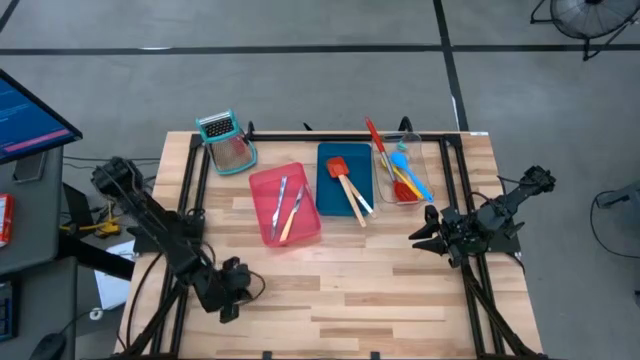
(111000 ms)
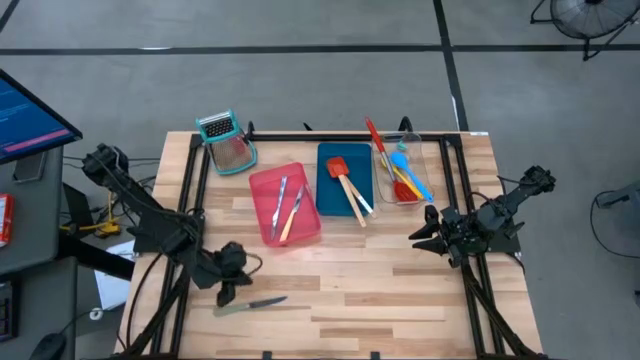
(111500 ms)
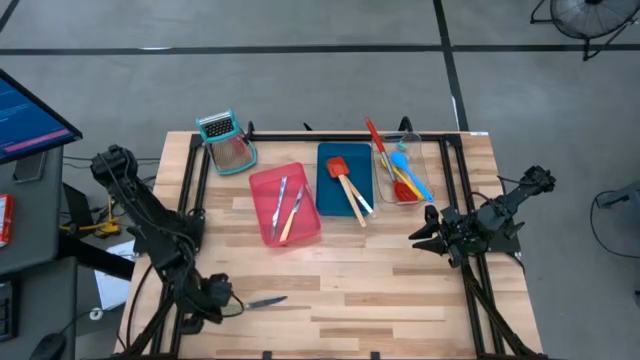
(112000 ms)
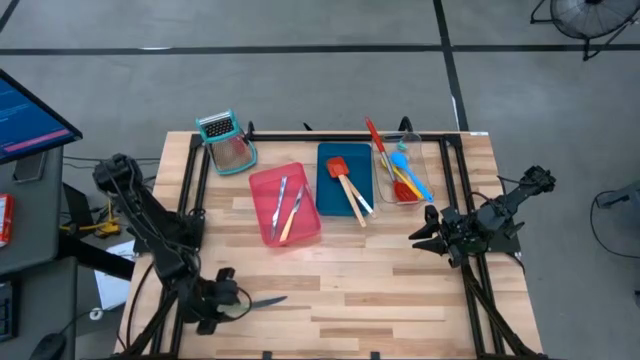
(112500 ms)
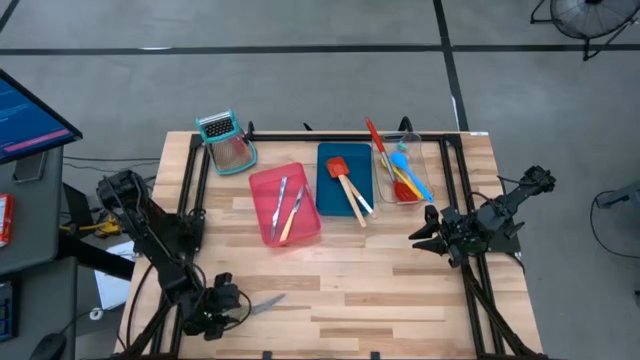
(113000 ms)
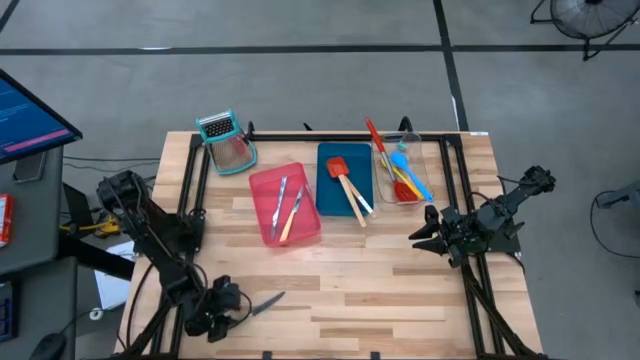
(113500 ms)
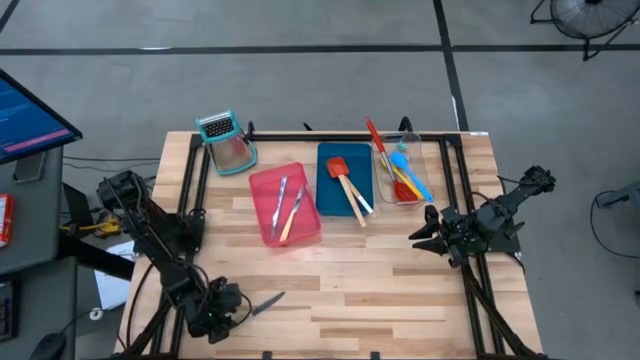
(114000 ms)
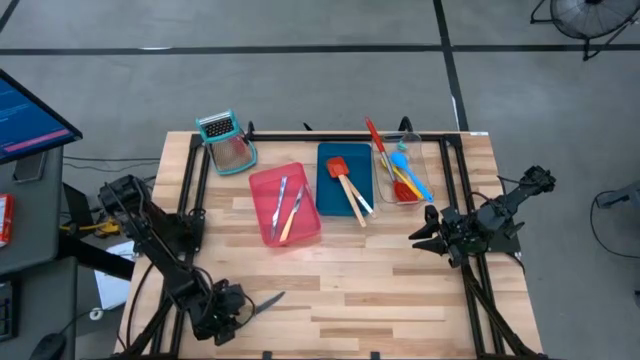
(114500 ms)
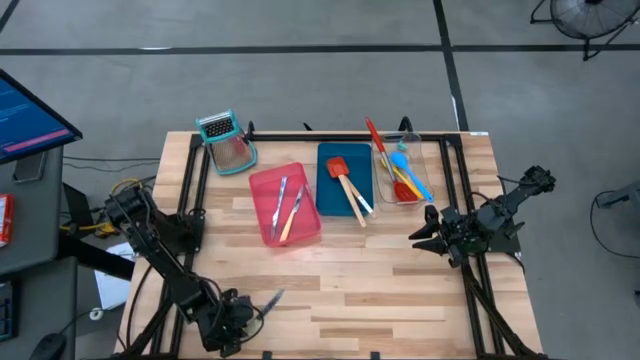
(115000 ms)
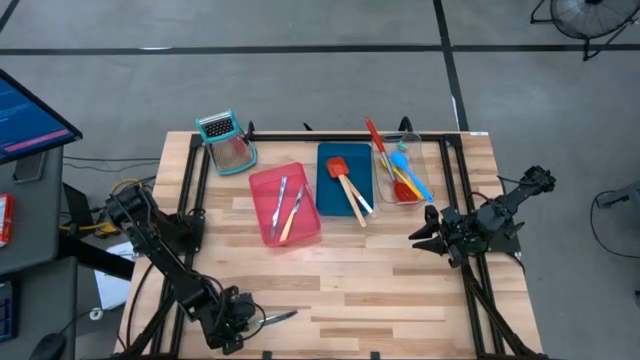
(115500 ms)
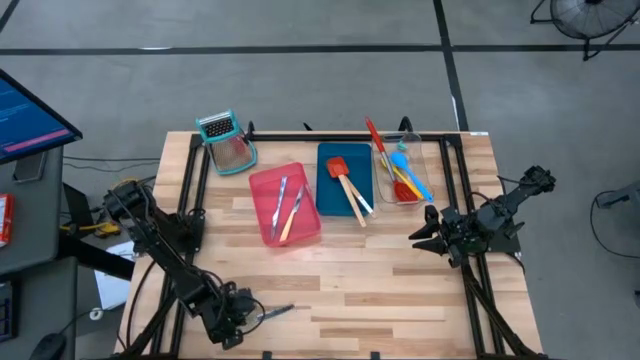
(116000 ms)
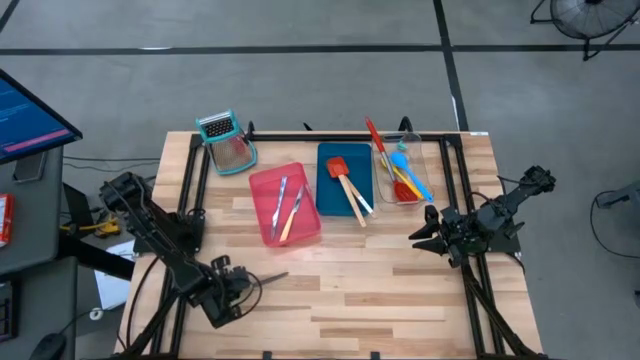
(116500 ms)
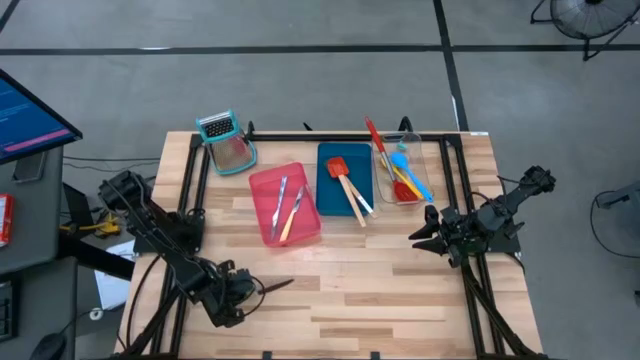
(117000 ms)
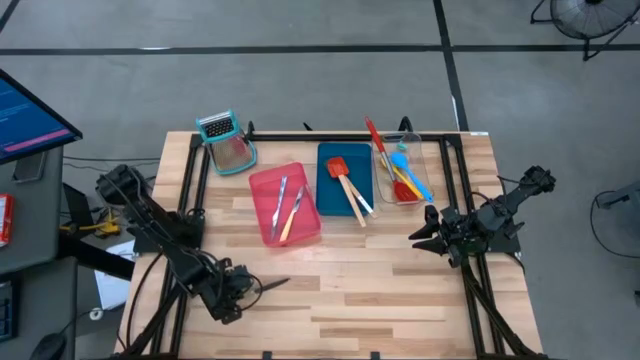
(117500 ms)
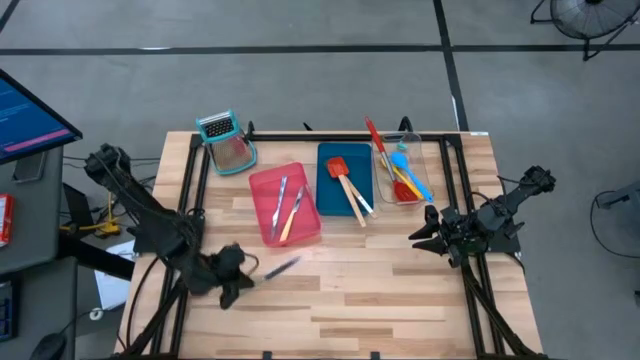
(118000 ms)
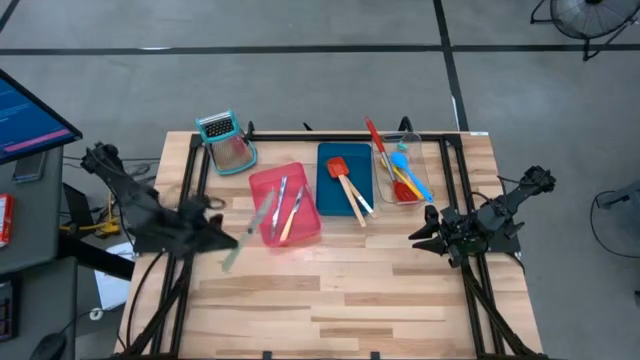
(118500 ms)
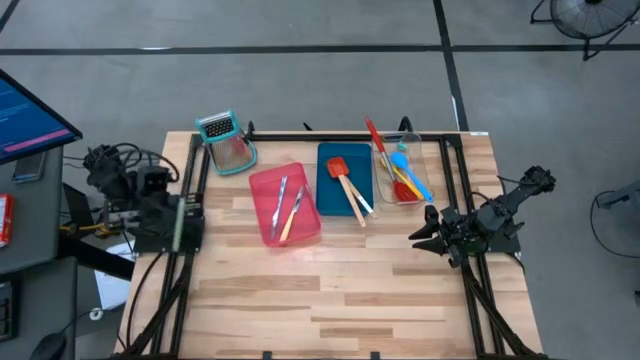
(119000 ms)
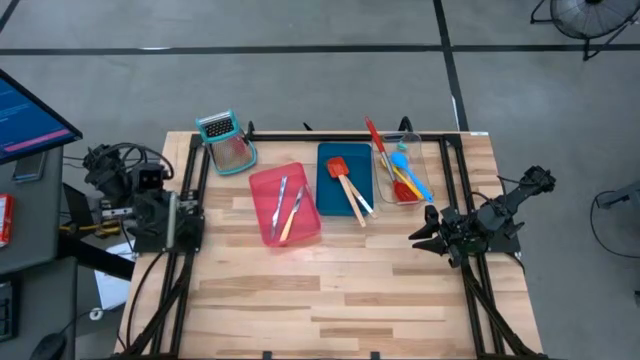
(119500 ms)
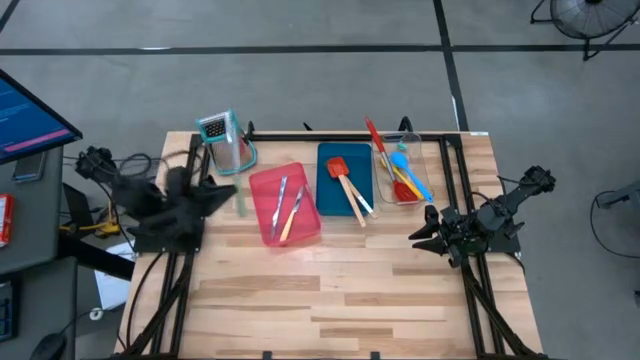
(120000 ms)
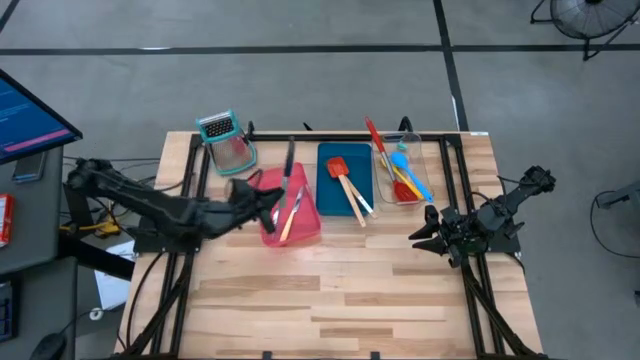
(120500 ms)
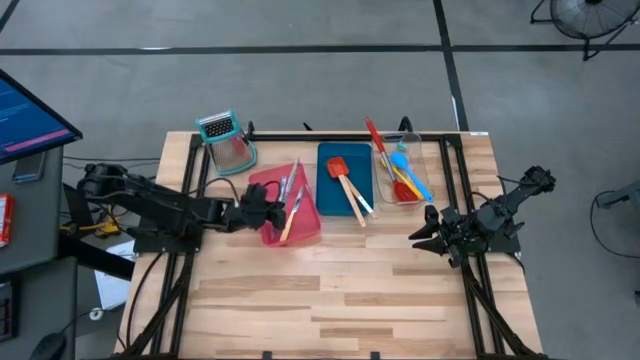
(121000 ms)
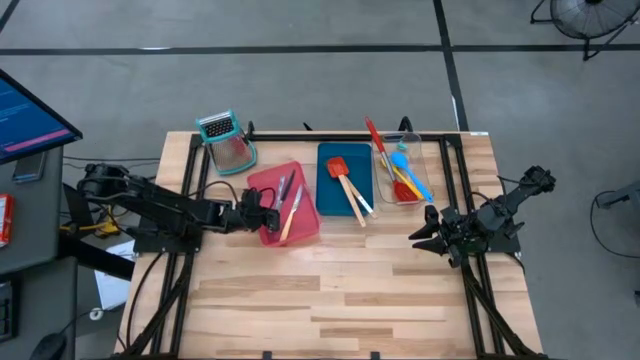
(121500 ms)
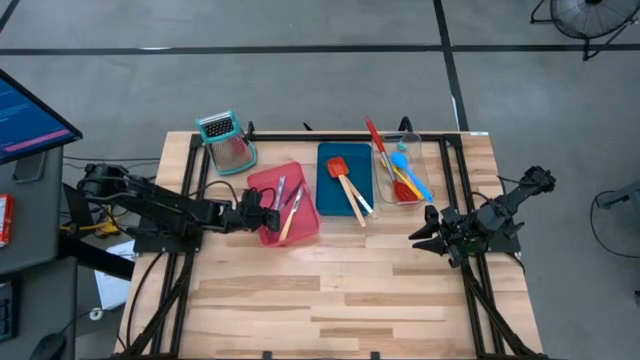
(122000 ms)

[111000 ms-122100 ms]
Task: Pick & Place Kitchen Items
Put the green table knife into the red bin

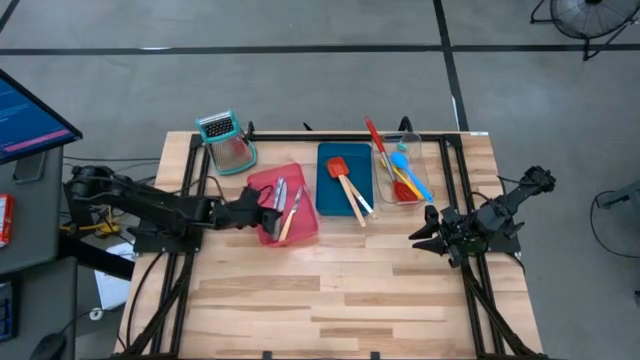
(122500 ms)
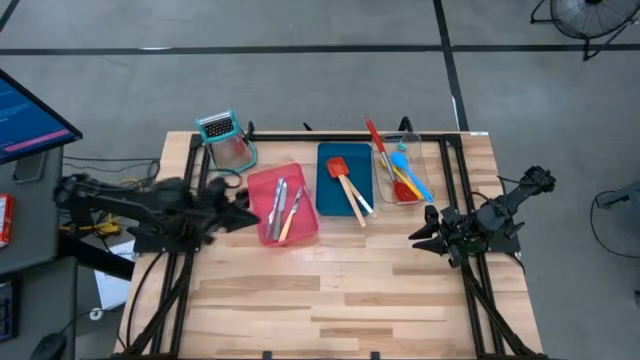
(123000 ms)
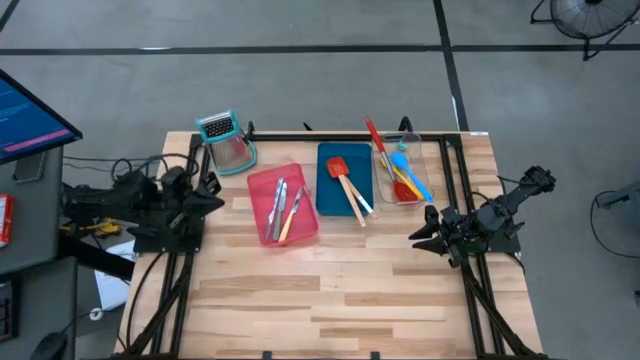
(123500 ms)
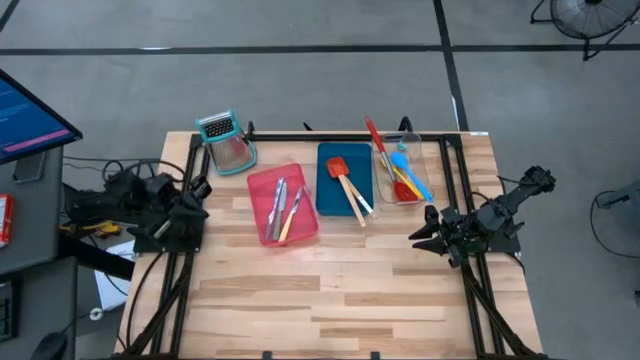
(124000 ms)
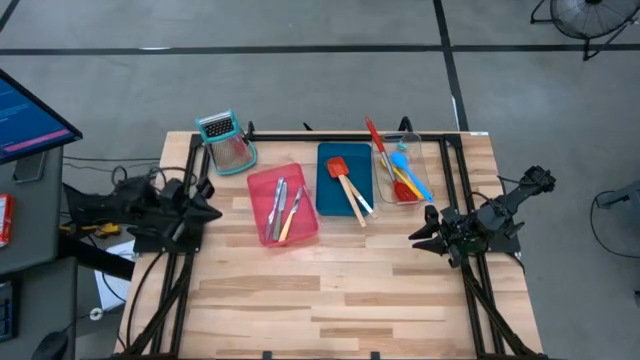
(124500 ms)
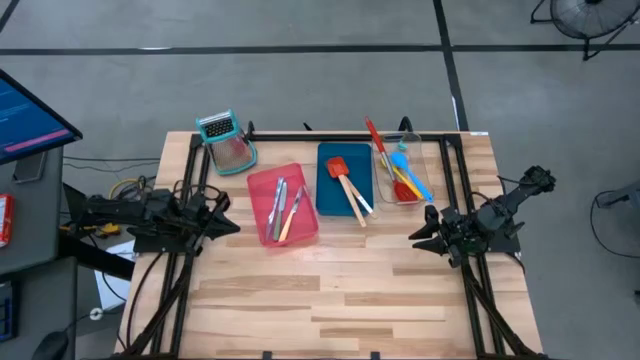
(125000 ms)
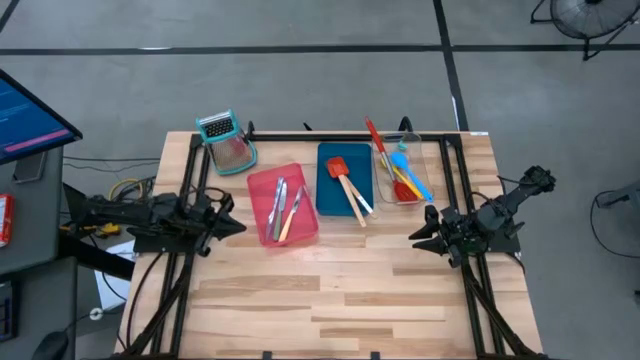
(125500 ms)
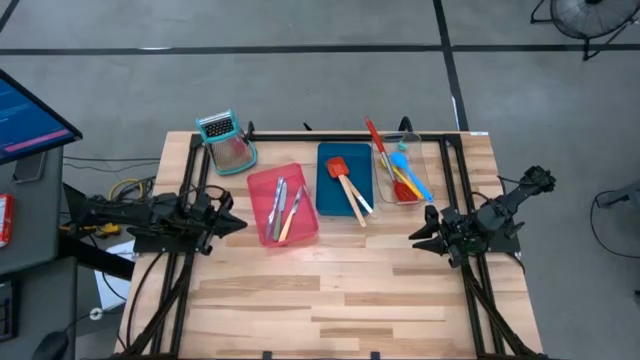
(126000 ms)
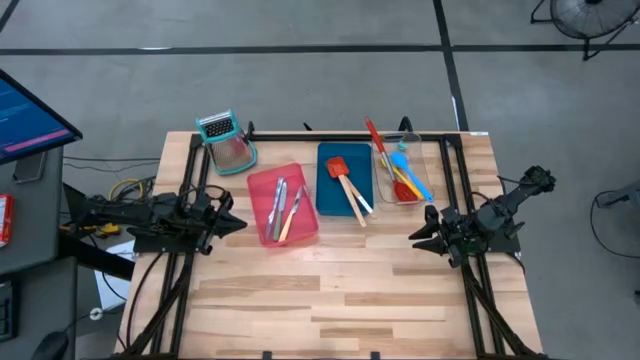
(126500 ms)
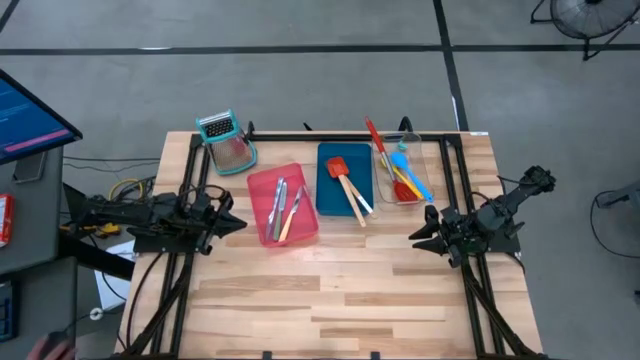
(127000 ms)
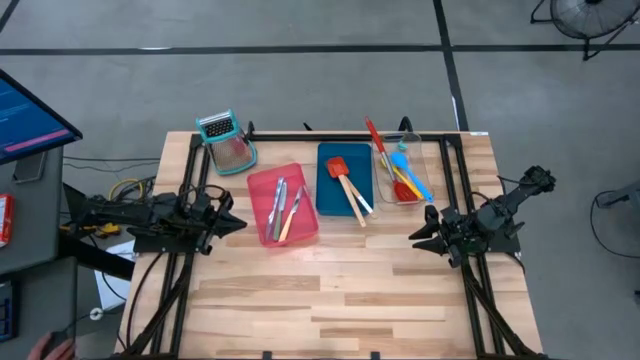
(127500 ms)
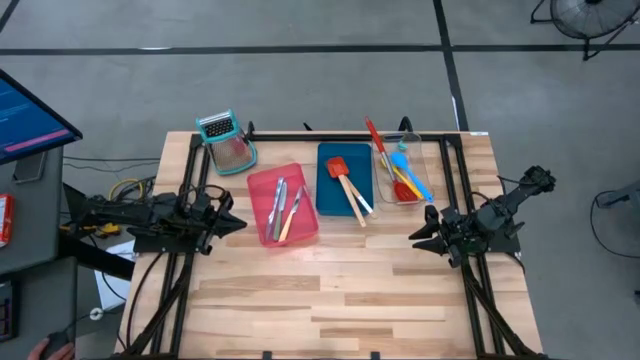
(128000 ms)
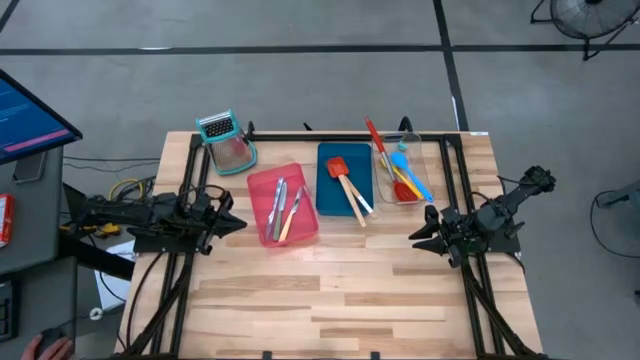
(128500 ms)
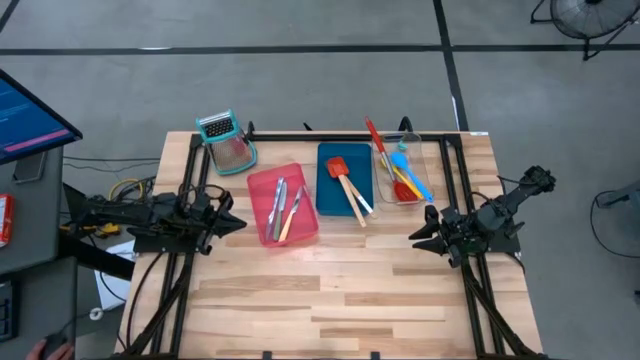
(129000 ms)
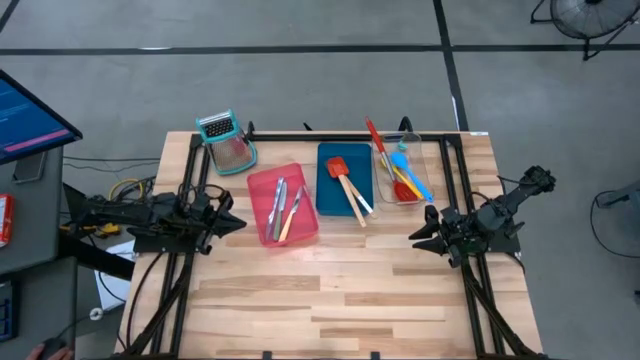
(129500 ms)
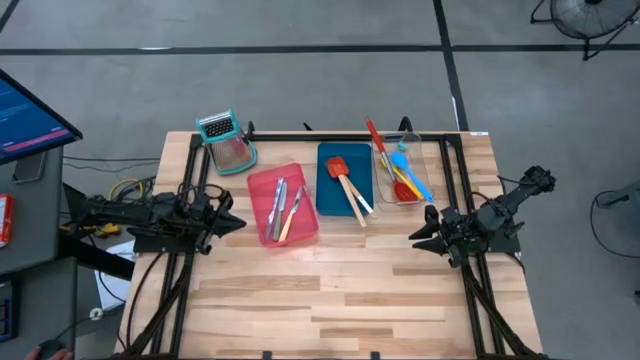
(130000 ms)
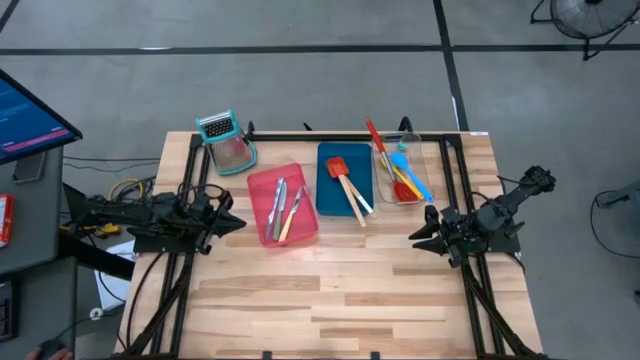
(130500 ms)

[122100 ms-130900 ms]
Return to Home Position
